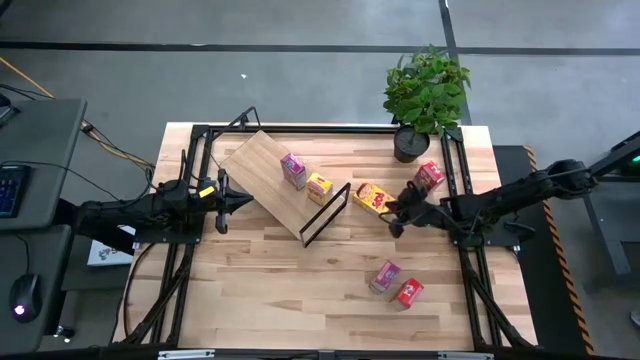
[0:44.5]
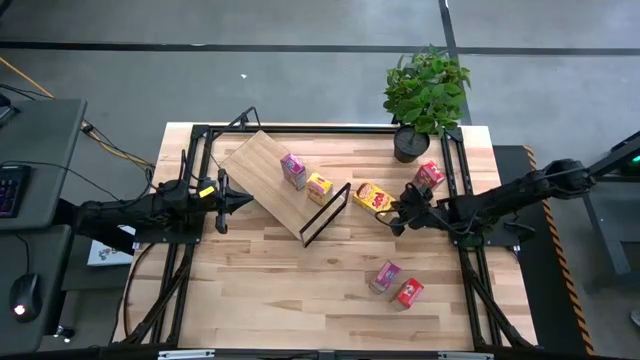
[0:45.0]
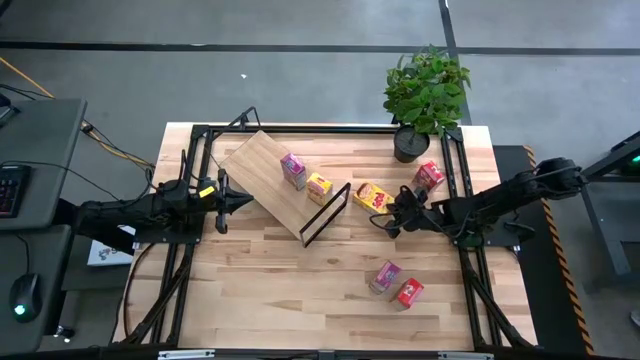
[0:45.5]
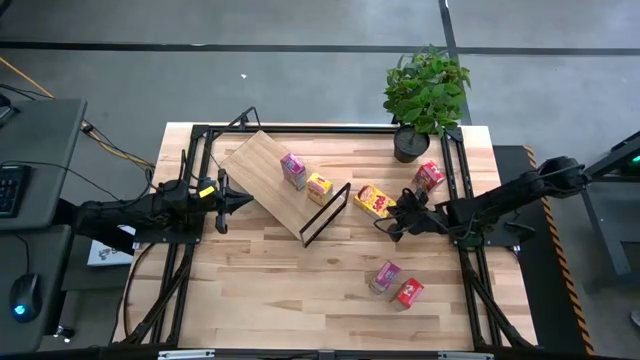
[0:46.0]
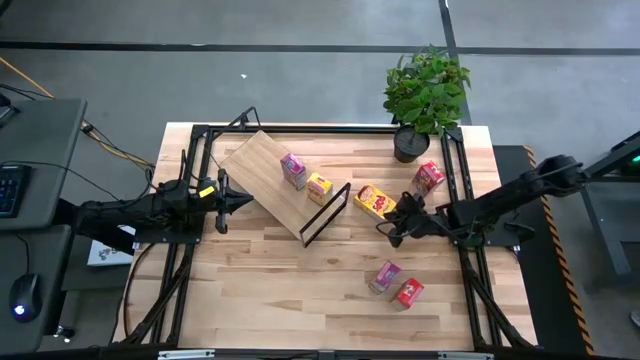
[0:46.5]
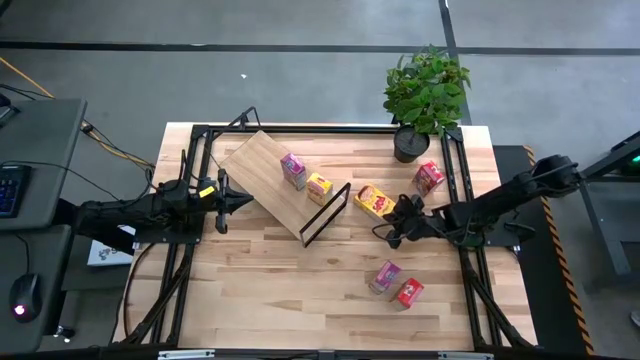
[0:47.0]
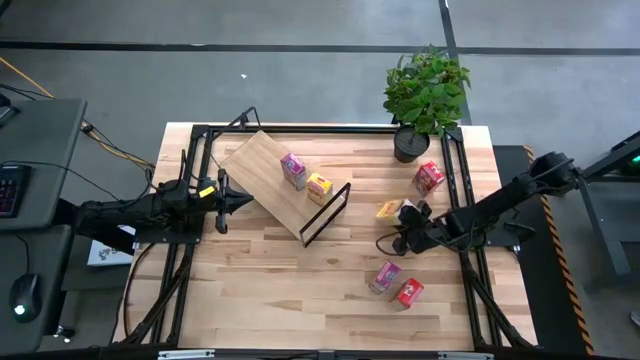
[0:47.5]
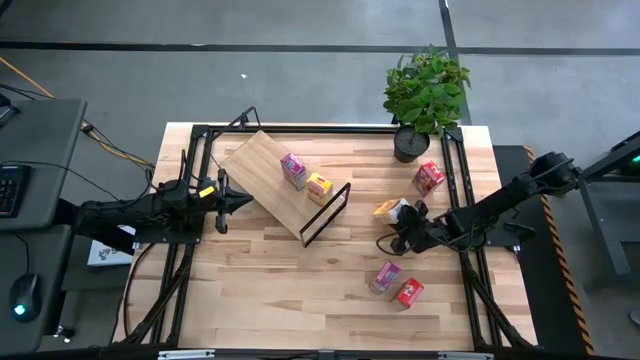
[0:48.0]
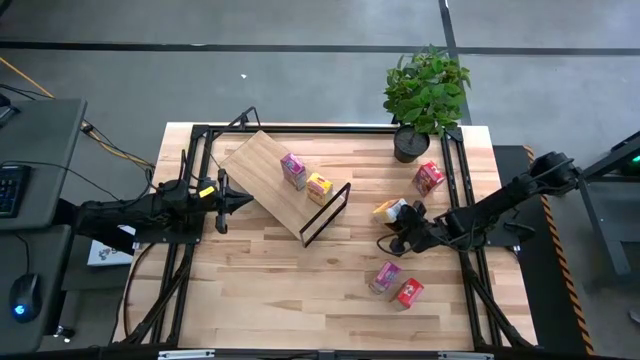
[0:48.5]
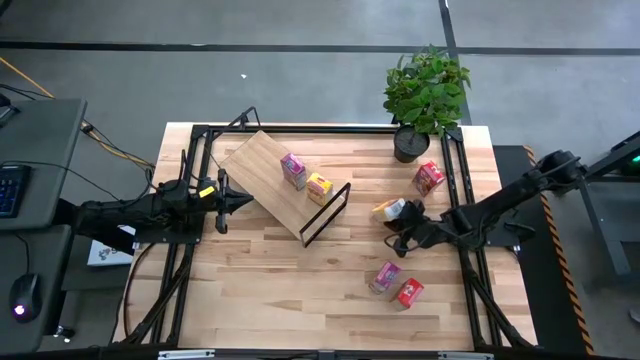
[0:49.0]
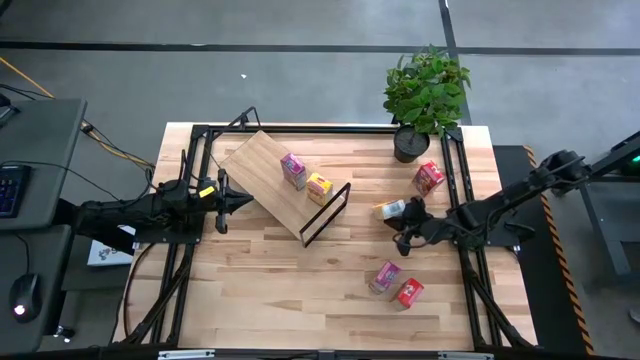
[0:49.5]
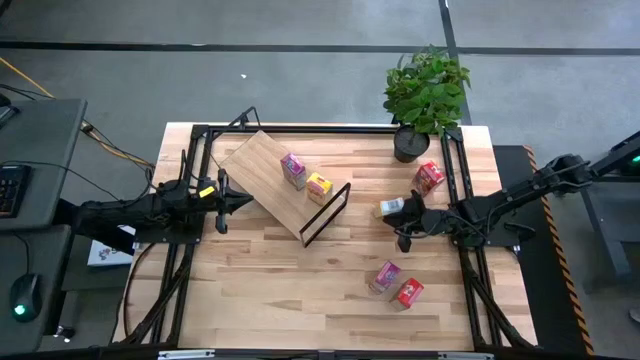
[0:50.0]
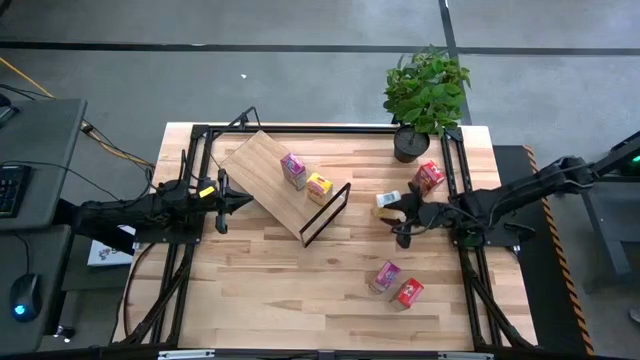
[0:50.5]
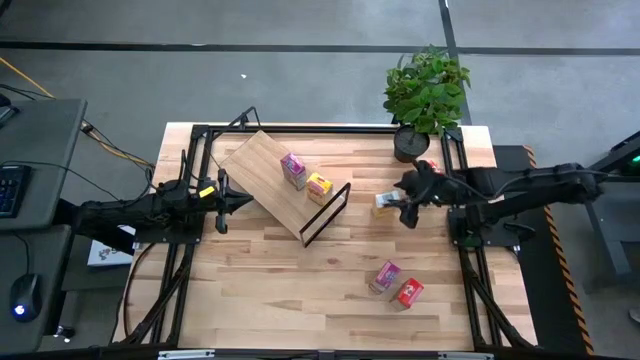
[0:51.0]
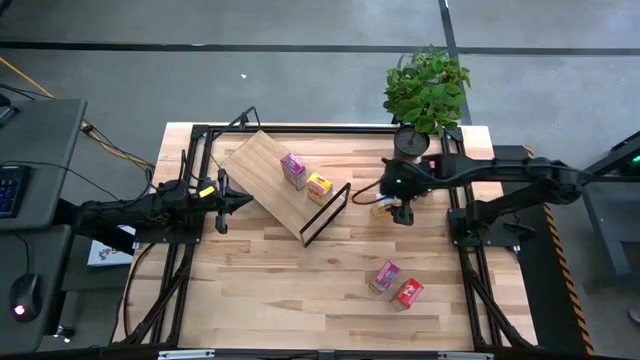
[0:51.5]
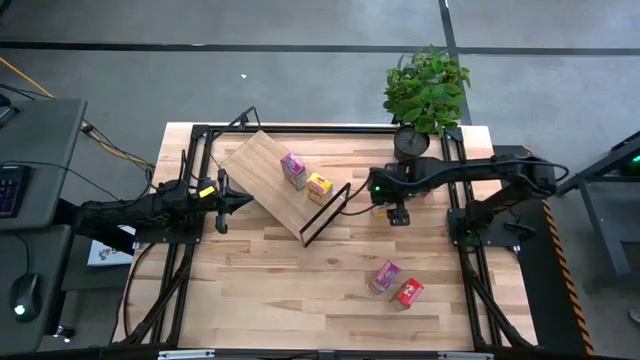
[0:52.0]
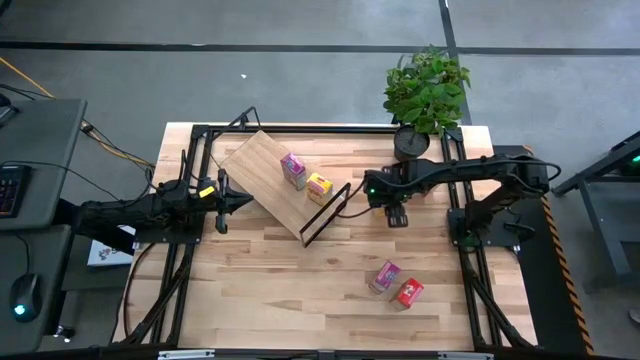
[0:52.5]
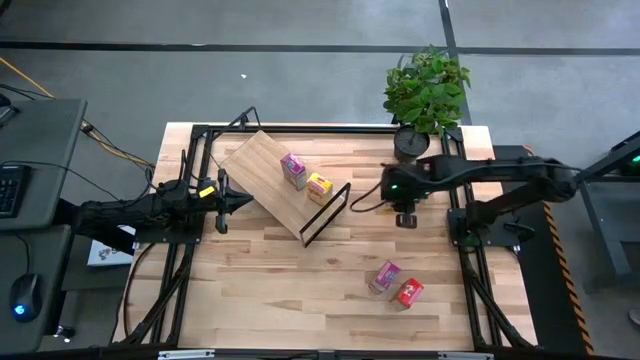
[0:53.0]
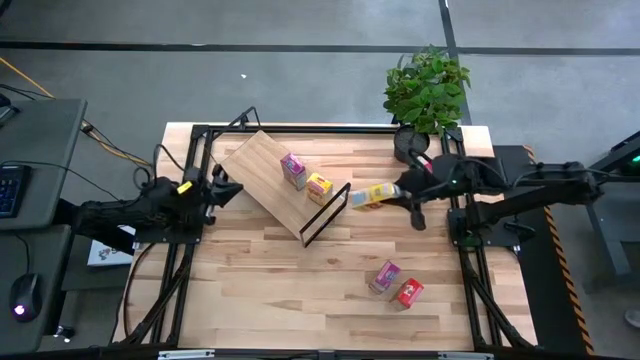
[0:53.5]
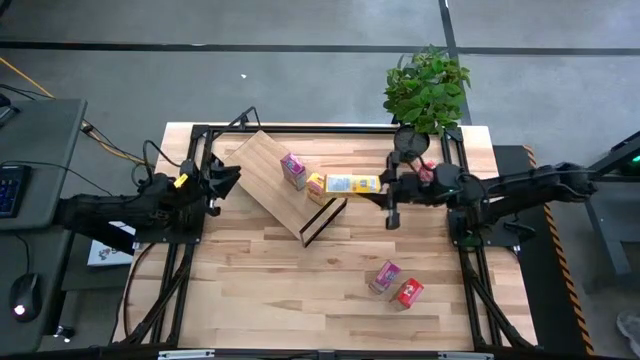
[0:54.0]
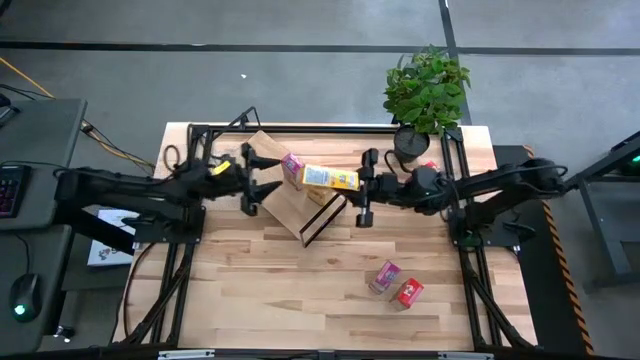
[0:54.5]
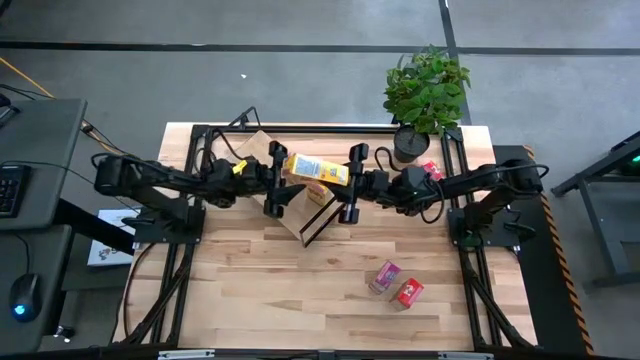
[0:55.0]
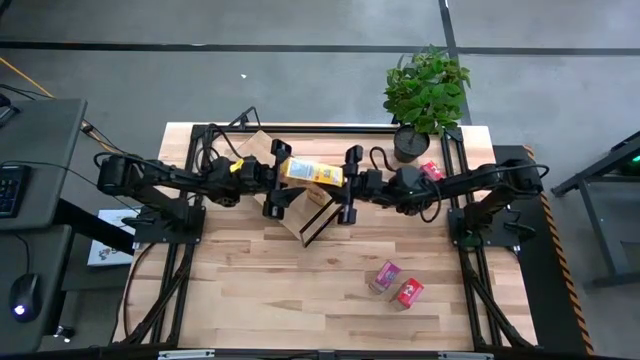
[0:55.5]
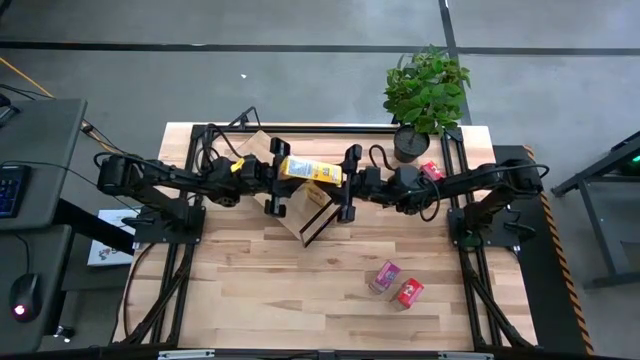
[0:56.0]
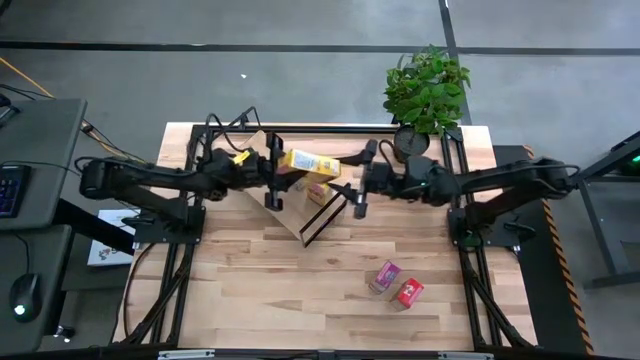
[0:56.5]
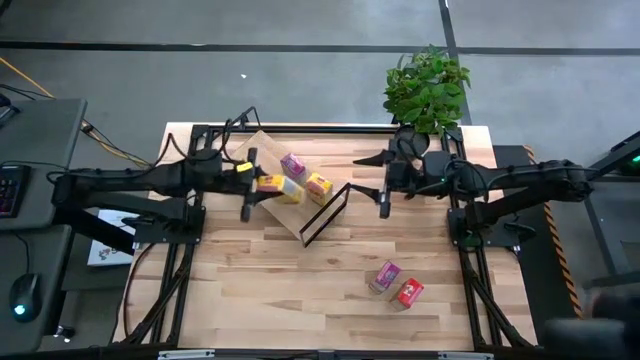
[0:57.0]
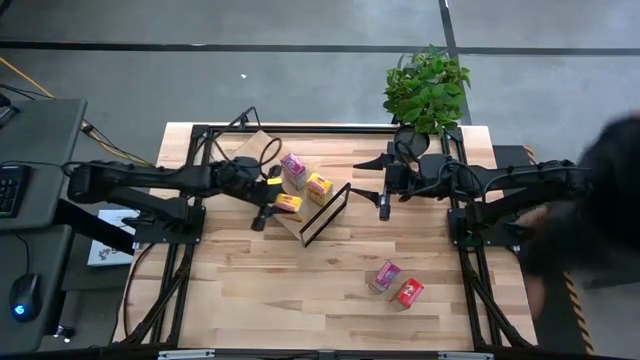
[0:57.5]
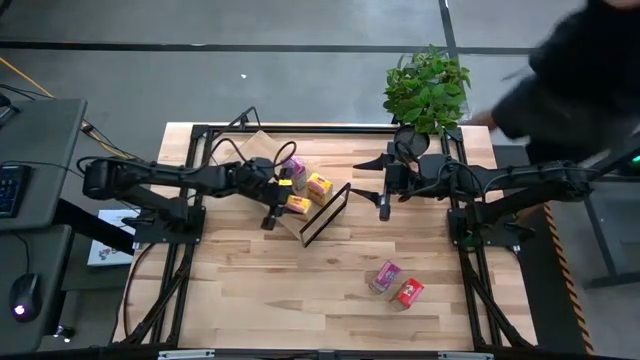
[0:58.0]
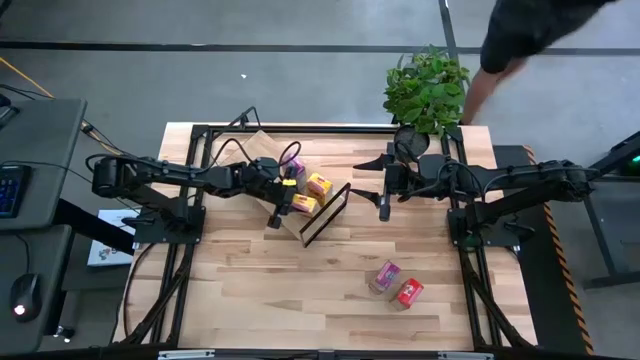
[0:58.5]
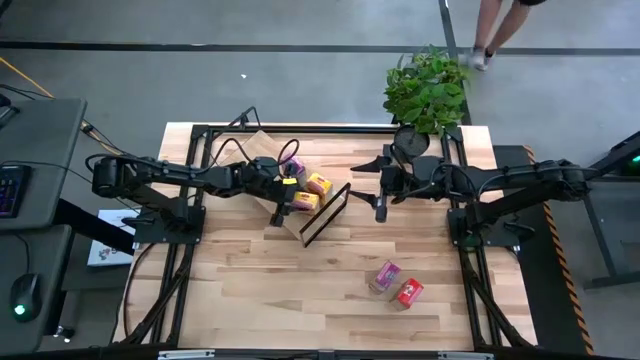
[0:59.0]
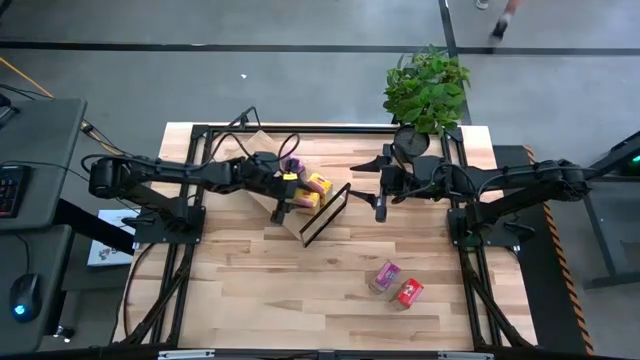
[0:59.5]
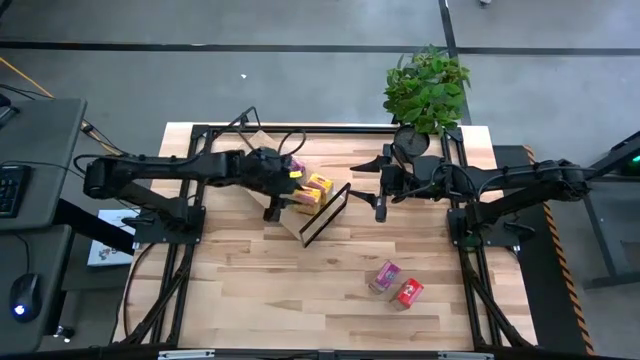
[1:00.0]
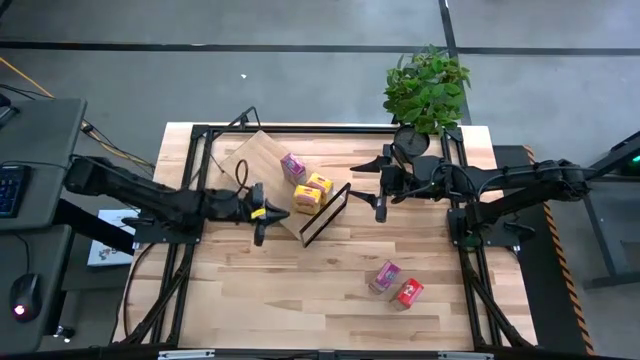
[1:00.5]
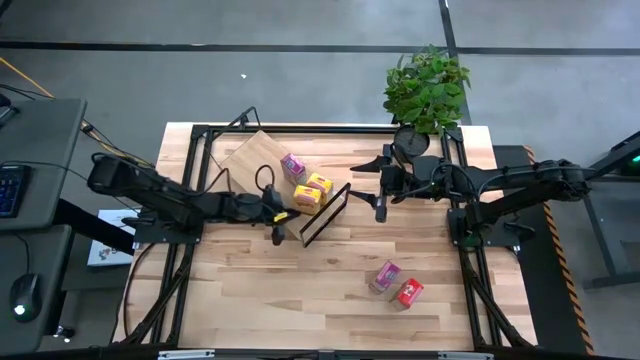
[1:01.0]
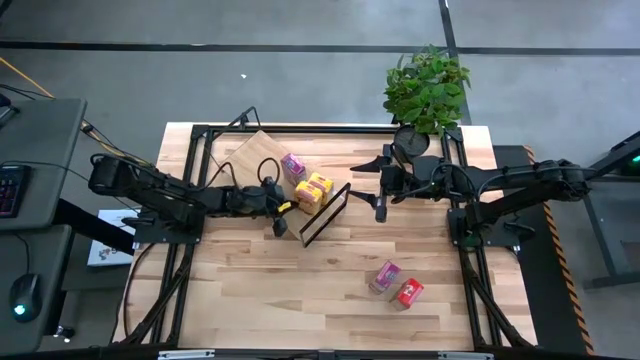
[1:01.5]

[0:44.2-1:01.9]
Task: Stack cereal on shelf
Put the yellow cereal on the shelf aligned with the other yellow cereal box

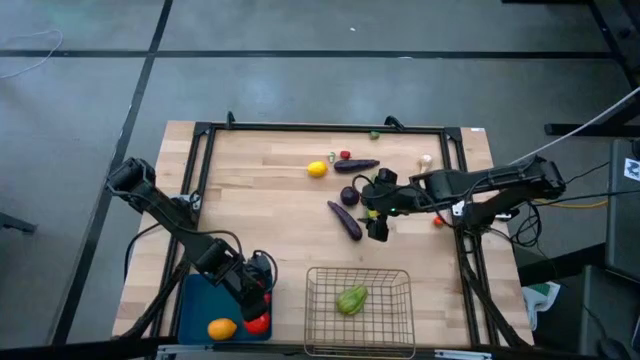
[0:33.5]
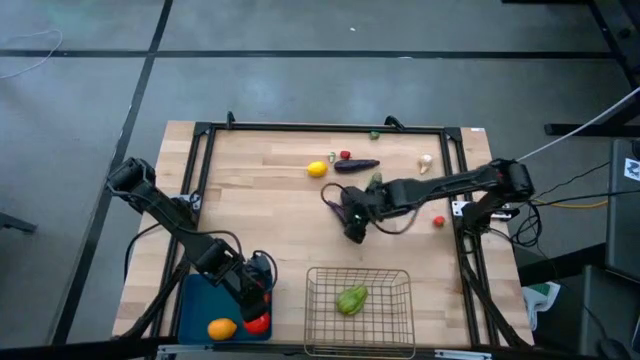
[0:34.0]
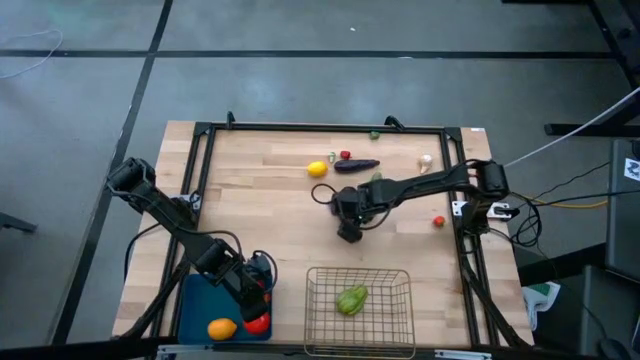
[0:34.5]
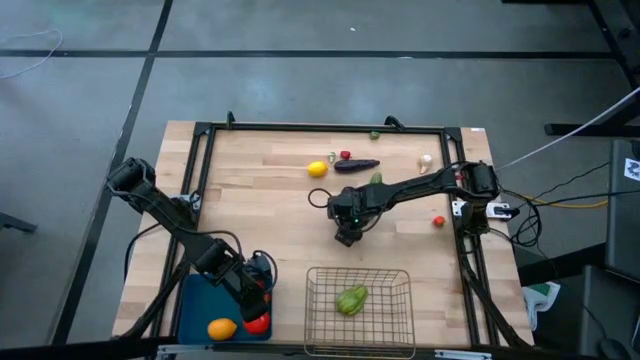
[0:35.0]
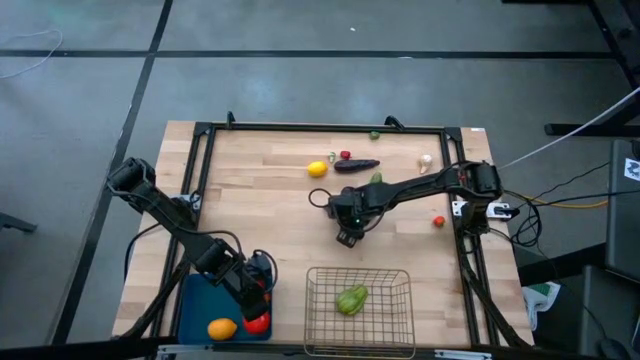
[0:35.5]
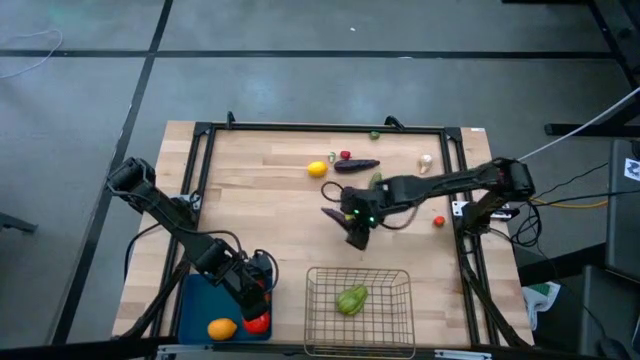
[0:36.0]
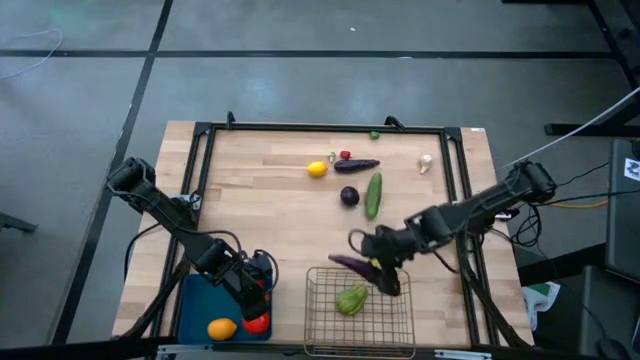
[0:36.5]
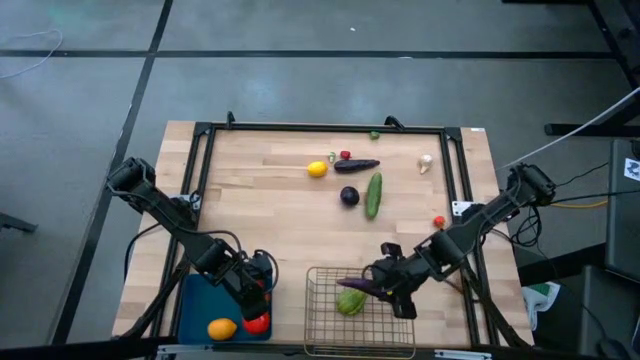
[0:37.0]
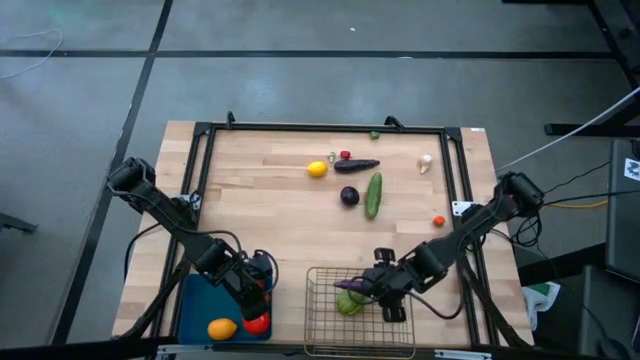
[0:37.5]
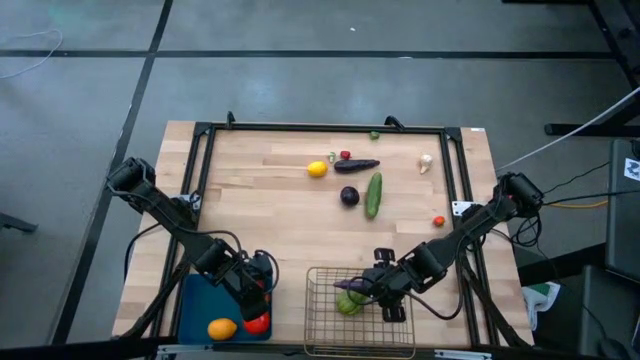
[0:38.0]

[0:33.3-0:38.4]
Task: Sort produce into baskets
Put the eggplant into the gold wire basket
